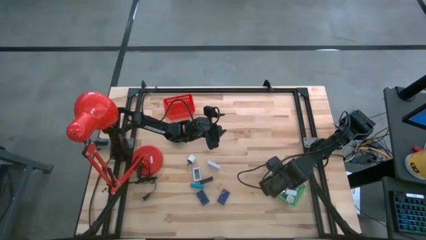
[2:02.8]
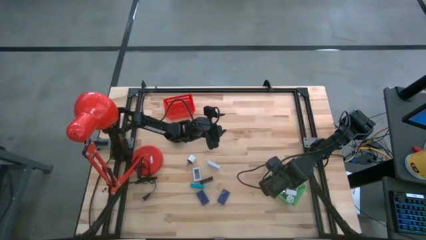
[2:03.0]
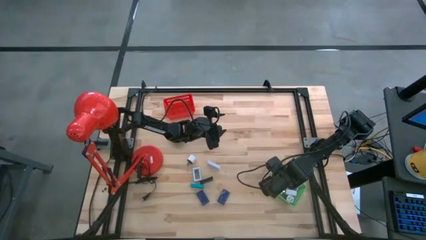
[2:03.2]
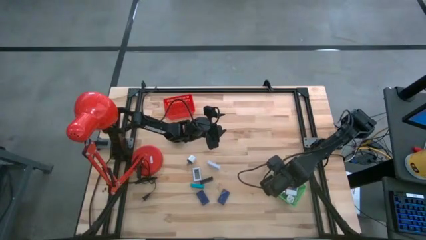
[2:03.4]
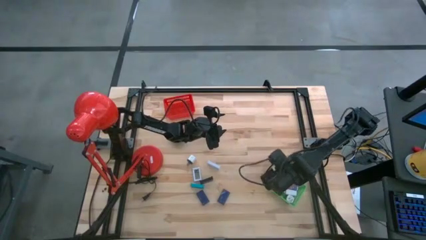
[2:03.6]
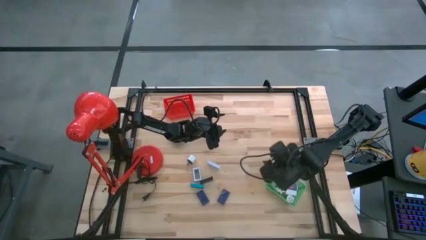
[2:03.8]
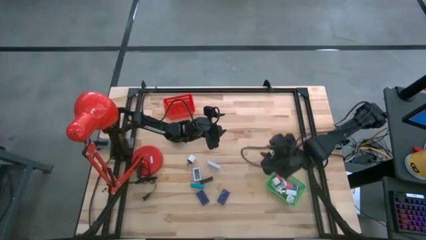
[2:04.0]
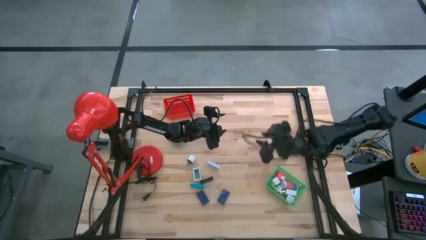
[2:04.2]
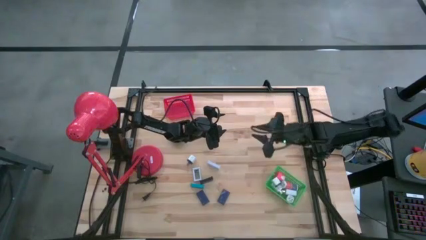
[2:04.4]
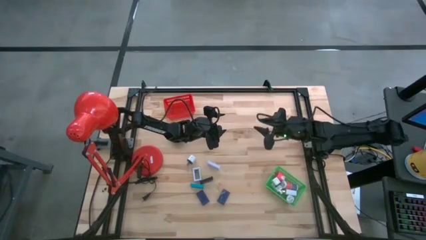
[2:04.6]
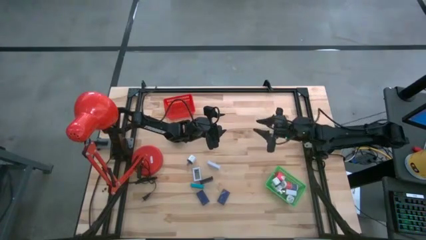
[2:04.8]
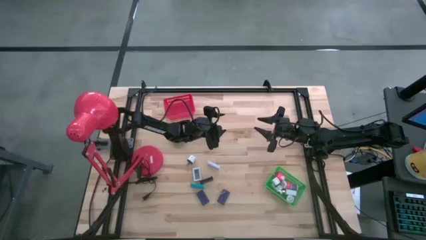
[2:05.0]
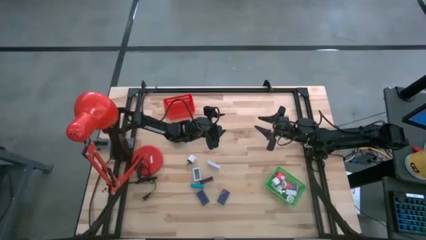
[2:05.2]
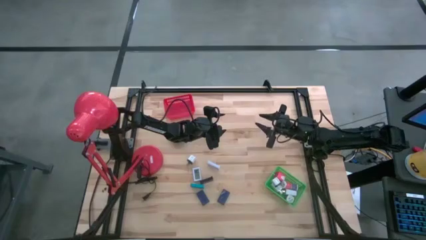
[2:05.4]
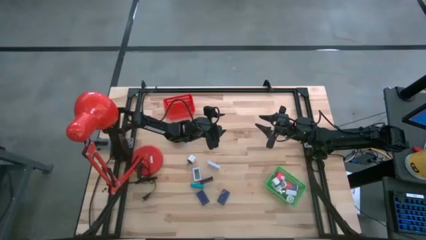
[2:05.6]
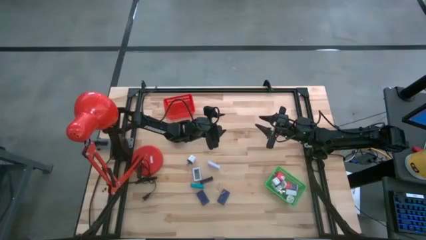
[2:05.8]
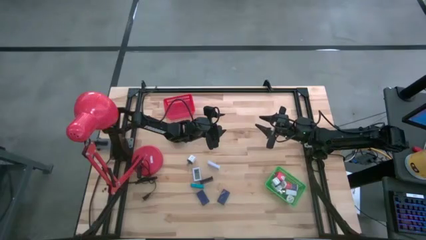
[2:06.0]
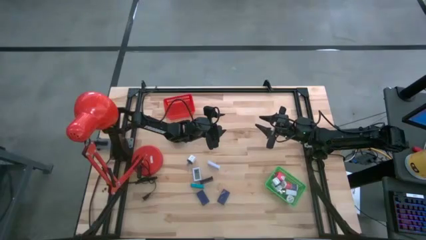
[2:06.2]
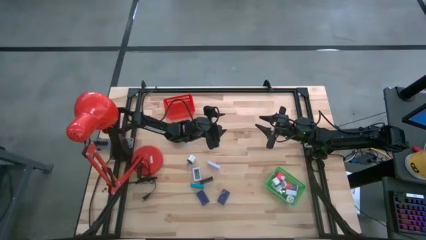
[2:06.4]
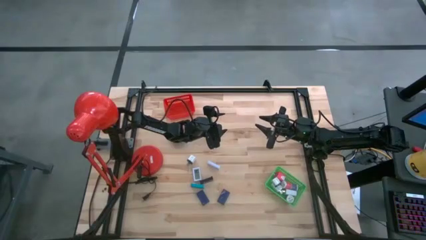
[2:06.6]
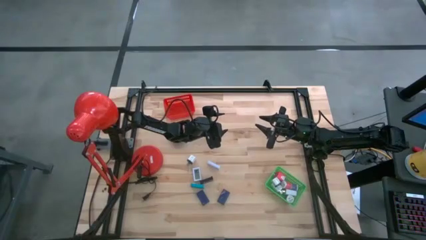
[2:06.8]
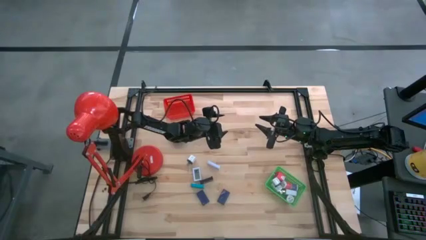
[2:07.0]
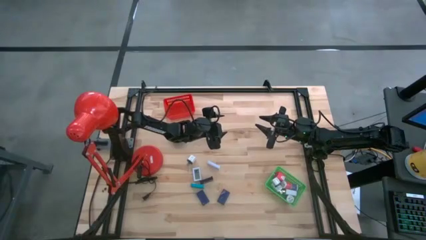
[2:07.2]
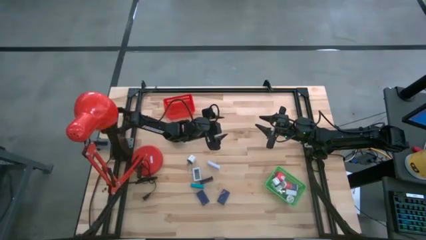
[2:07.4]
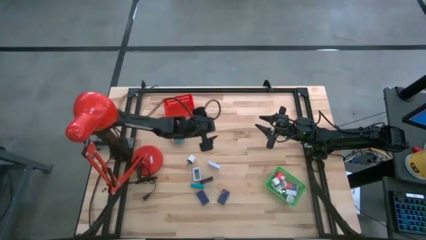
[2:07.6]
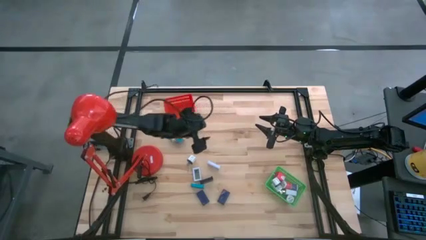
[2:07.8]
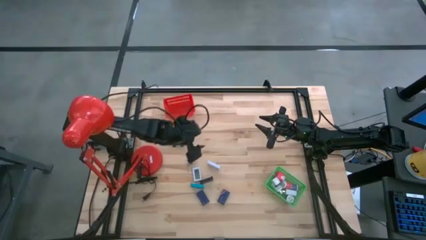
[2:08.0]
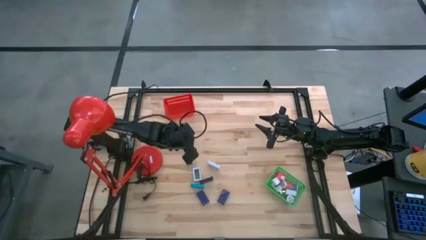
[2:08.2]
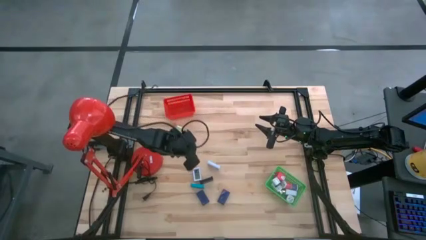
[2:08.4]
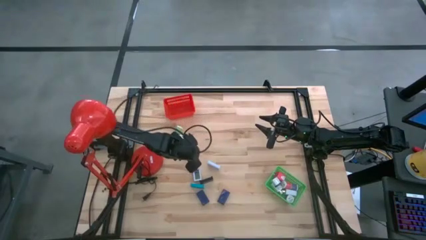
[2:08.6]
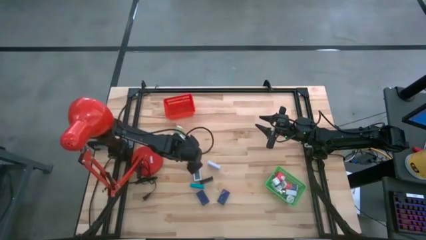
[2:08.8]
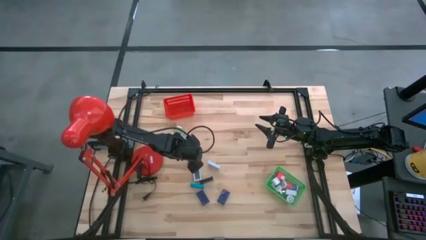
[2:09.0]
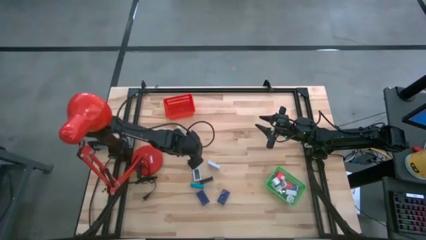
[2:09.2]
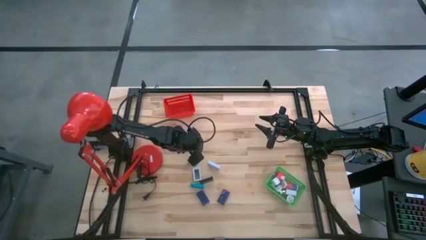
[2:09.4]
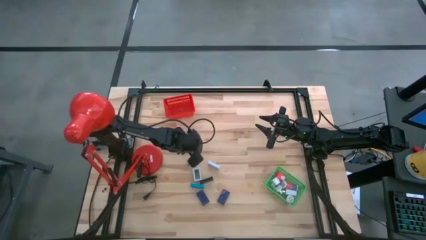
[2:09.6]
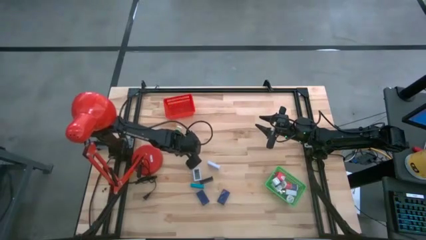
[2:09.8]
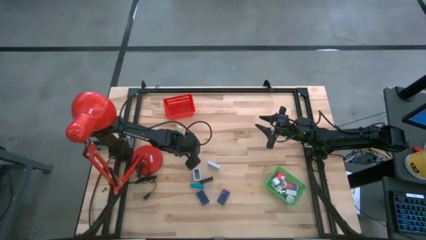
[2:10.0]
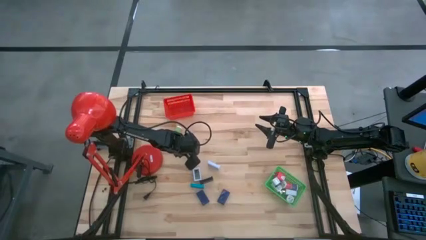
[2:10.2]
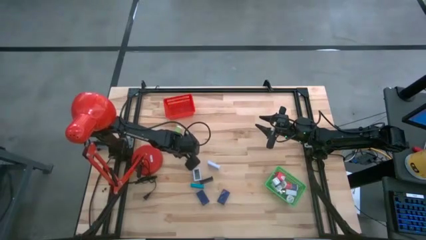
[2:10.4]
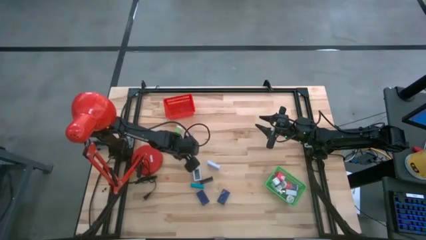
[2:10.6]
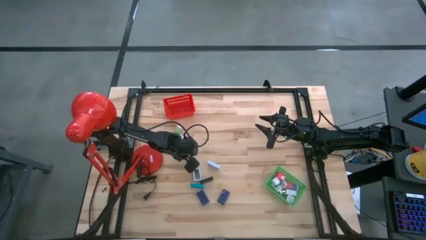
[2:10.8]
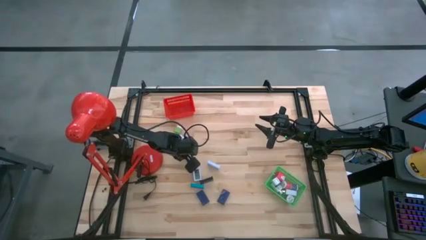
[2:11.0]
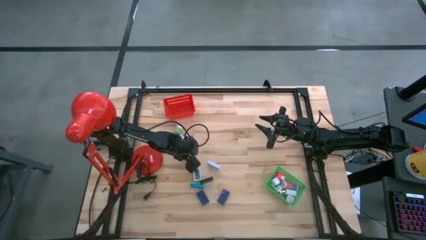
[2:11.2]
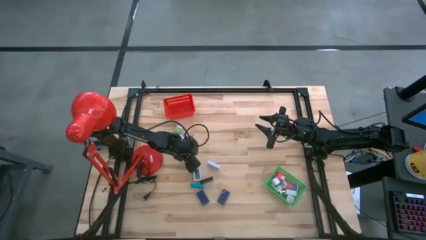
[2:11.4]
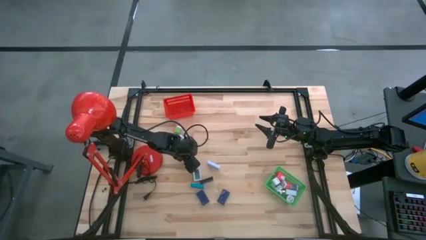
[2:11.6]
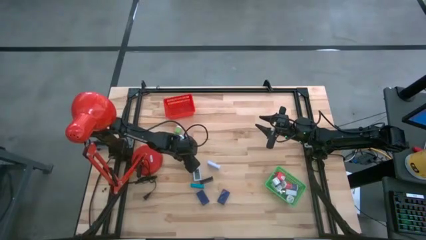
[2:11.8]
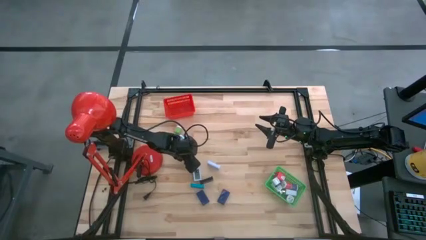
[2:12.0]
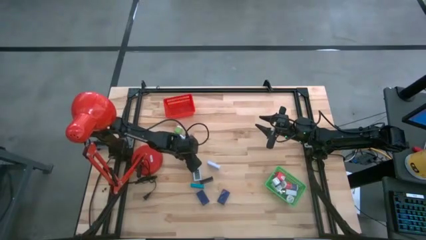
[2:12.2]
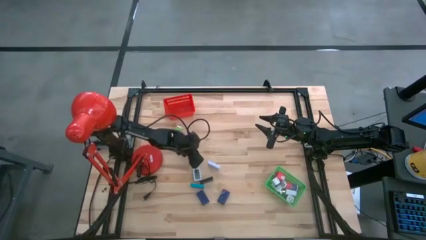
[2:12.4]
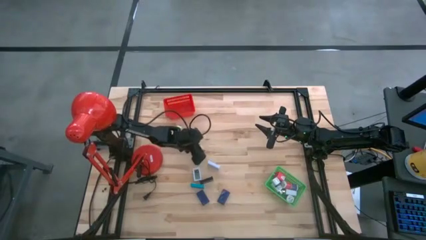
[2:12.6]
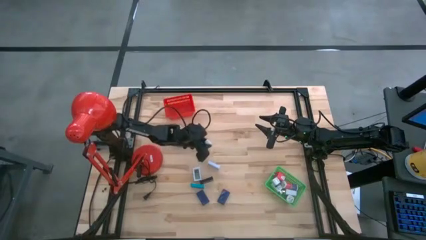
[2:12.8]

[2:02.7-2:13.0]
Task: Pick & Place Office items
Put the white black charger adapter into the green bin

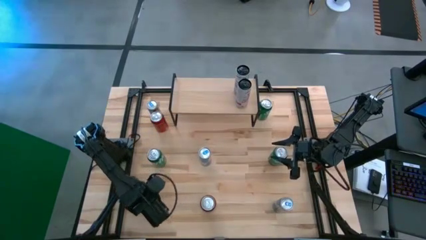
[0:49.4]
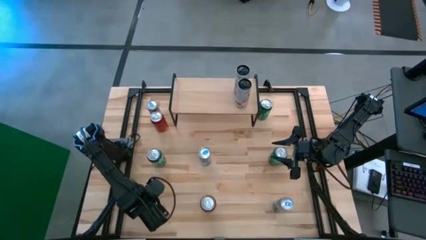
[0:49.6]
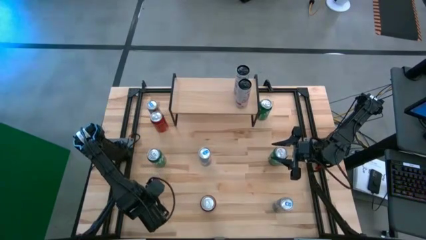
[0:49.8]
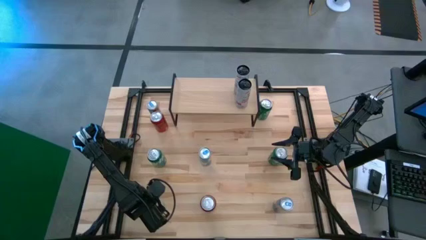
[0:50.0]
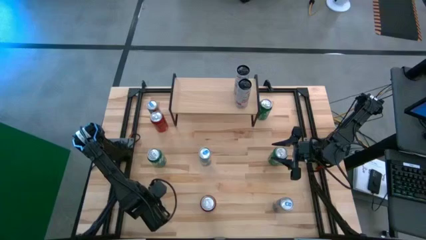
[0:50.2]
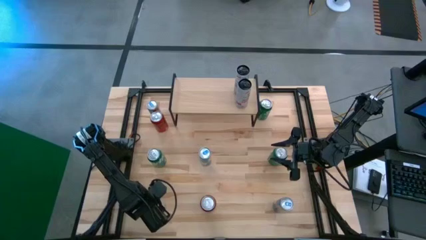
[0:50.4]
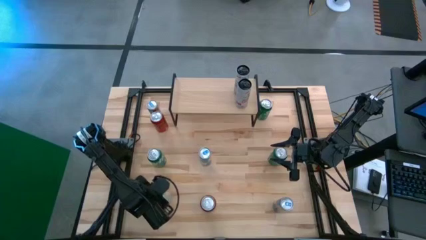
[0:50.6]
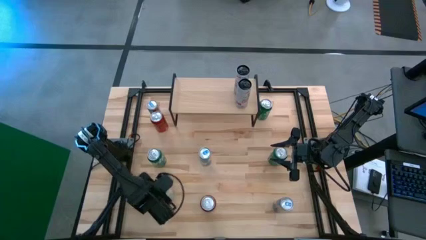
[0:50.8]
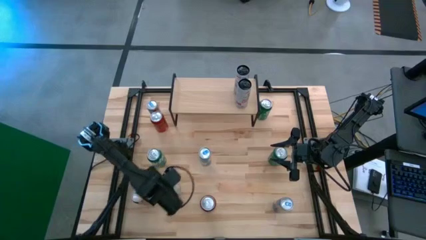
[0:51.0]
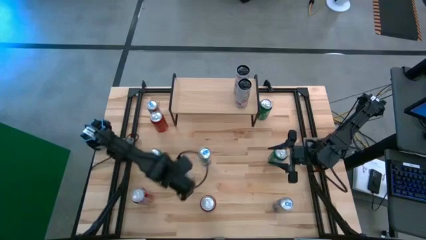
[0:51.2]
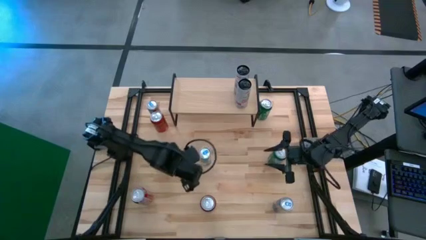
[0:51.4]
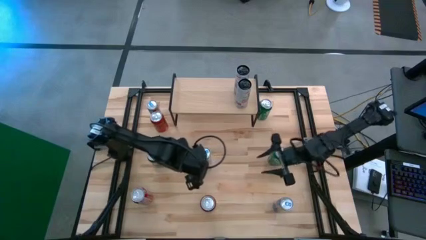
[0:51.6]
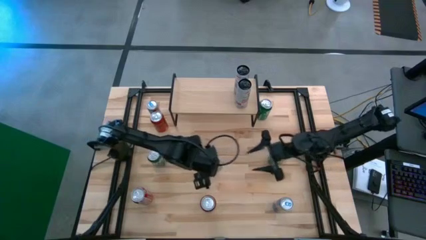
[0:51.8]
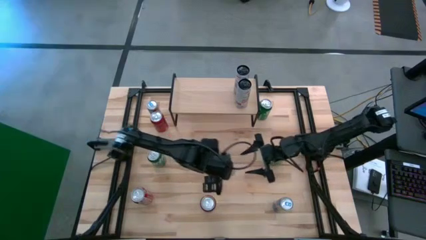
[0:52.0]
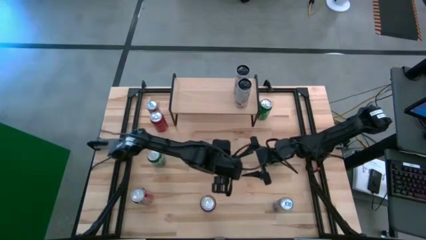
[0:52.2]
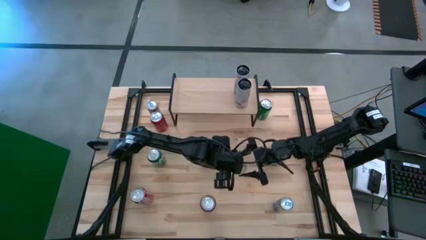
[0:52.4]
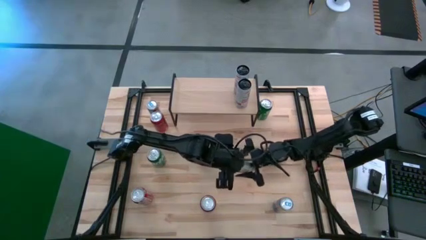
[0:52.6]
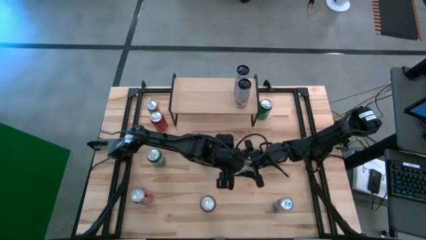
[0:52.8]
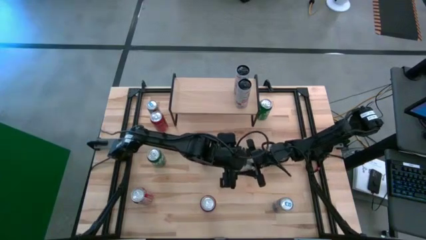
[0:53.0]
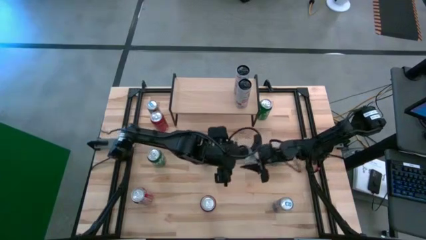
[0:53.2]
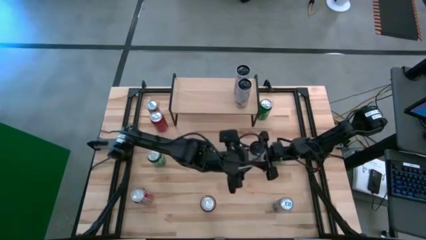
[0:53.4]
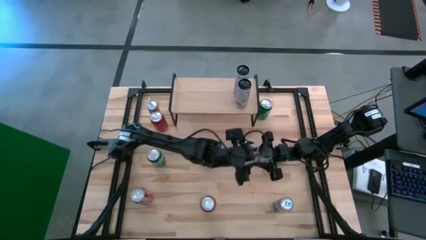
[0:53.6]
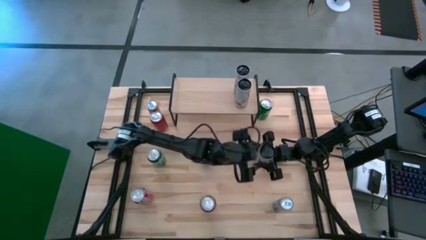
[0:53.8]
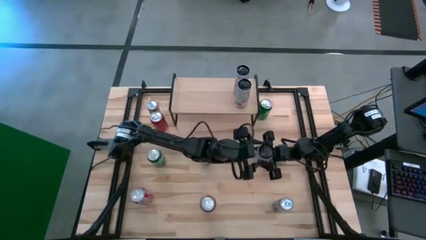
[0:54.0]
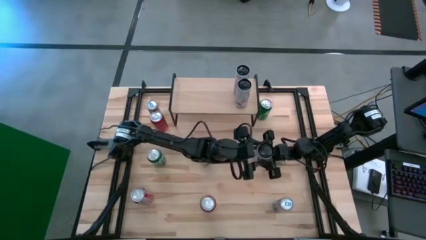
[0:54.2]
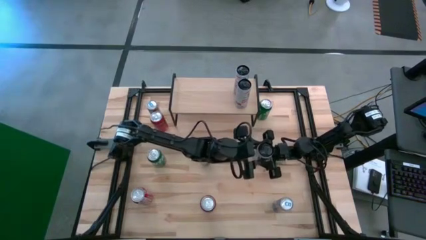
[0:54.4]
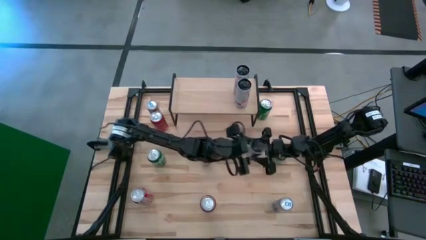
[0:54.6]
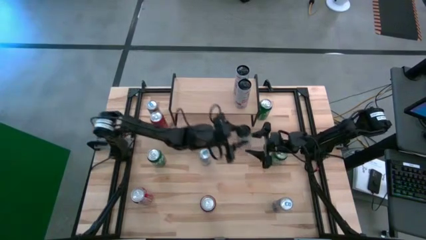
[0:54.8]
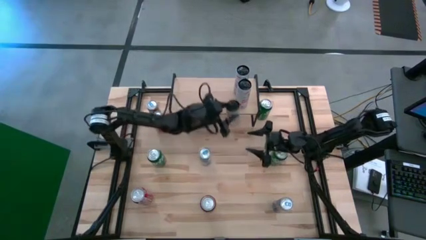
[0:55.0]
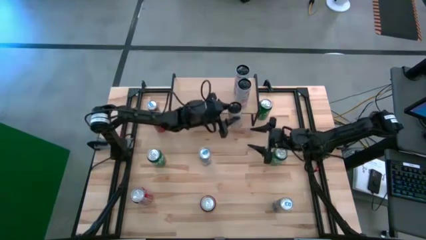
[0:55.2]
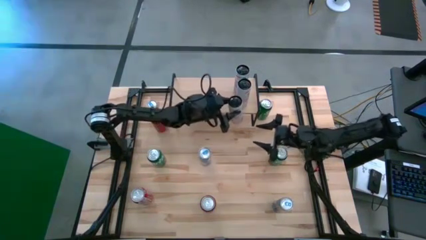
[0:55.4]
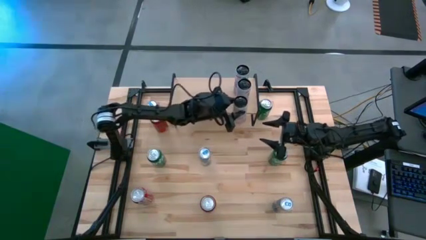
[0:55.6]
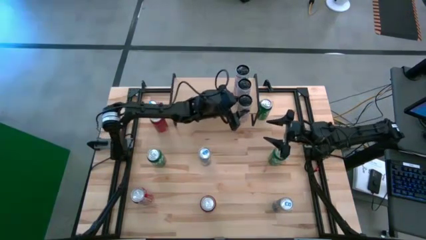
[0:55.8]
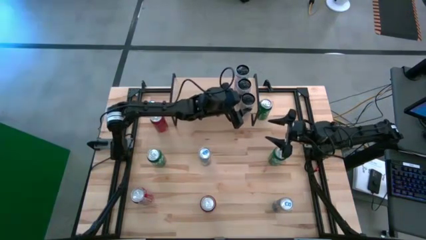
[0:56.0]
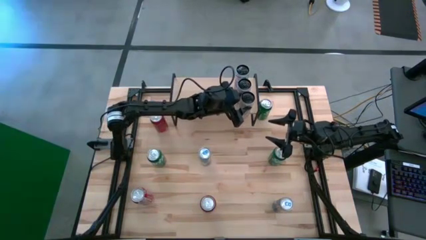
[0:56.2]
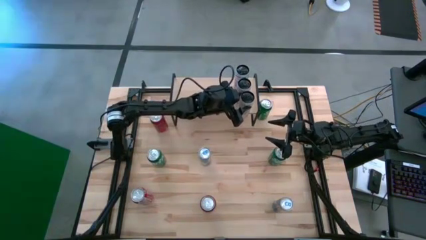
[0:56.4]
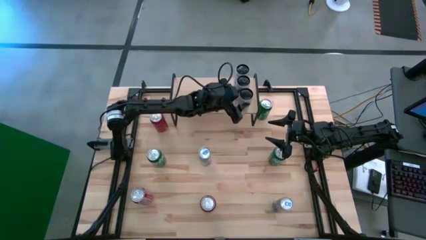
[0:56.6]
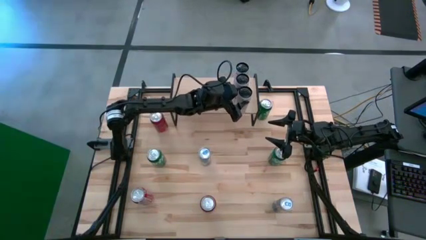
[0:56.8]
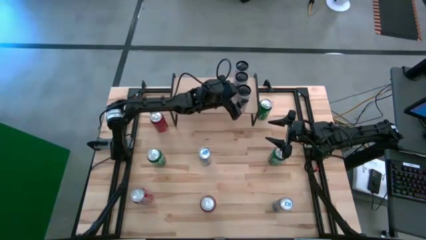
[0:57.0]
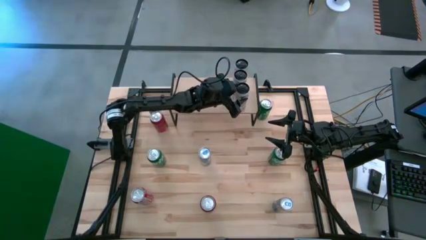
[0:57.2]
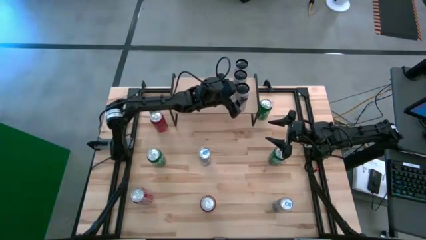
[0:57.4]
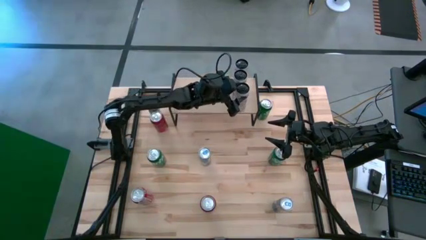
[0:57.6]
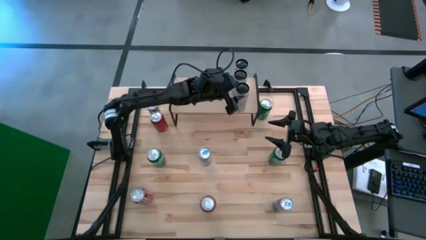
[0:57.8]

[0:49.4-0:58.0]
Task: Place canned beverage on shelf
Put the white pink soda can on the shelf aligned with the other white pink soda can
